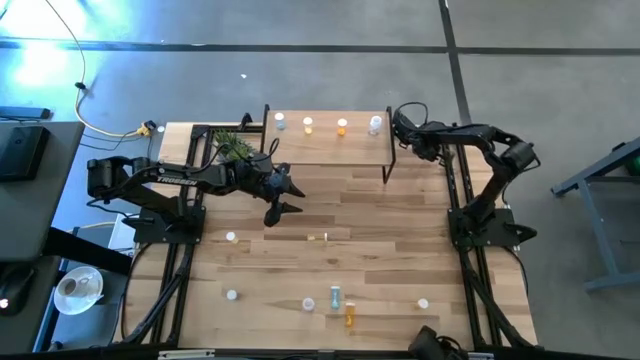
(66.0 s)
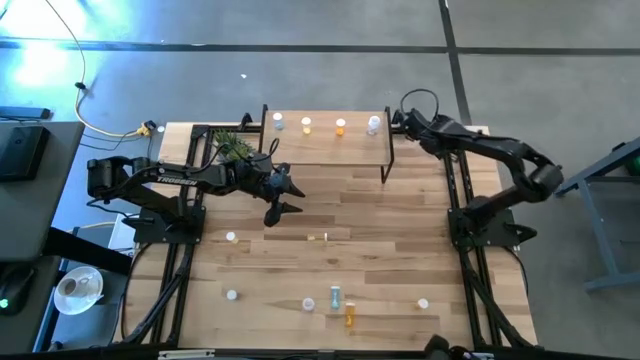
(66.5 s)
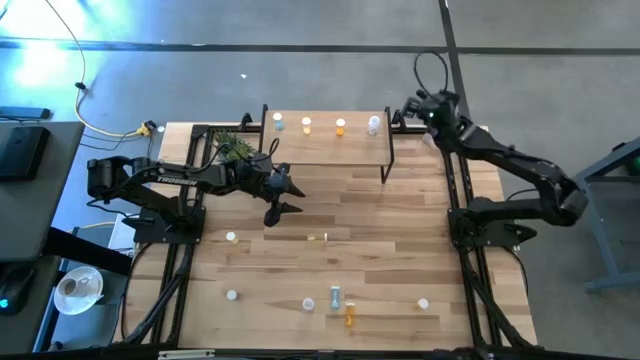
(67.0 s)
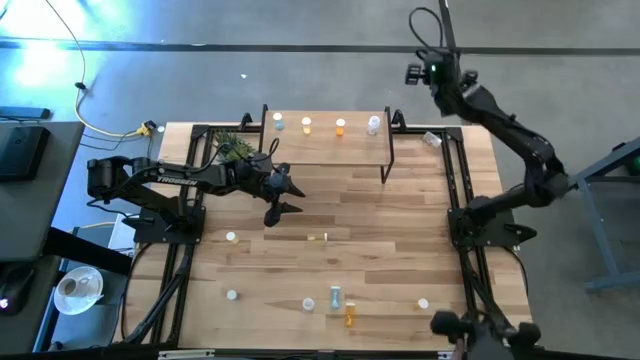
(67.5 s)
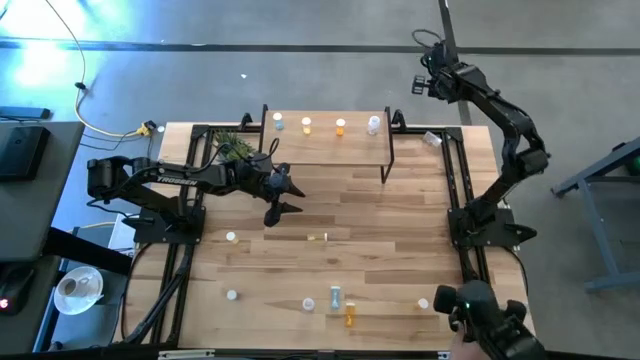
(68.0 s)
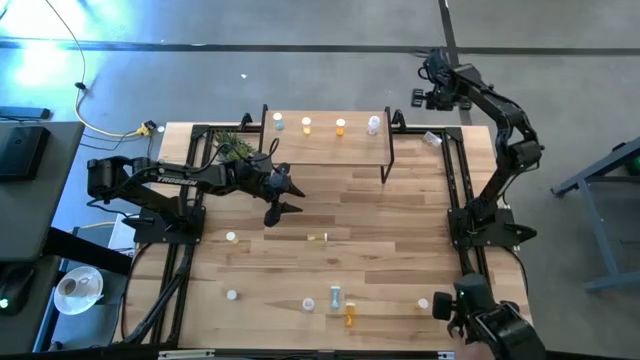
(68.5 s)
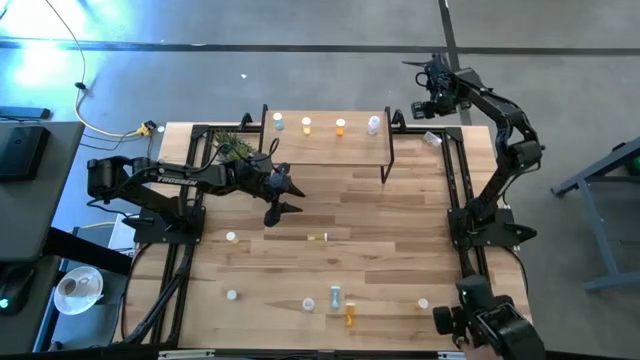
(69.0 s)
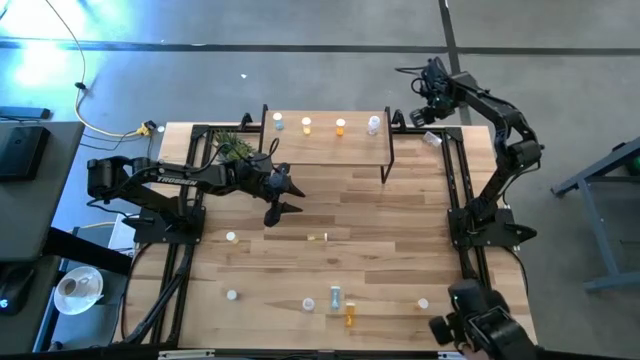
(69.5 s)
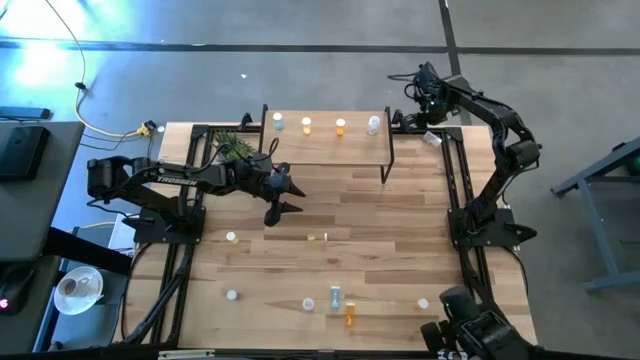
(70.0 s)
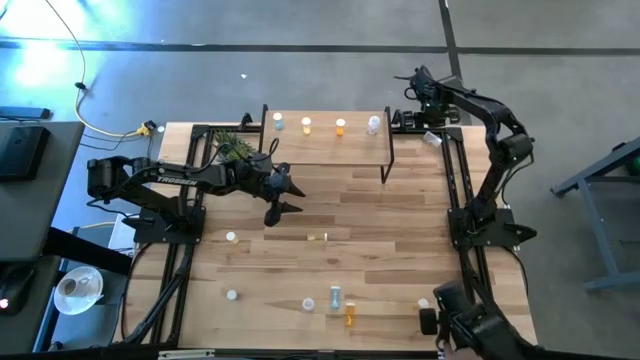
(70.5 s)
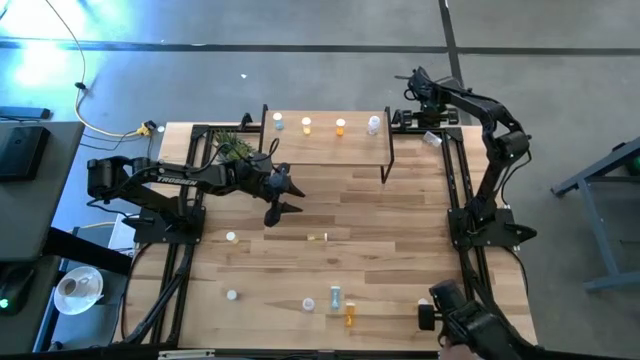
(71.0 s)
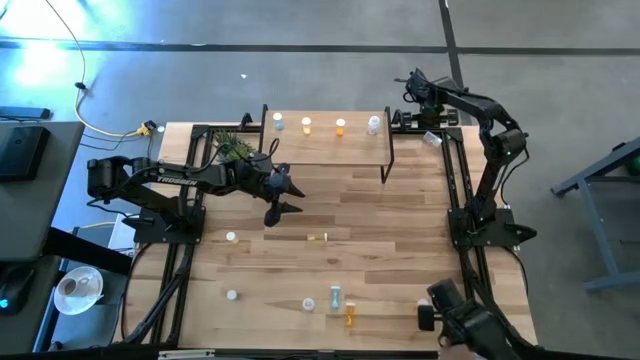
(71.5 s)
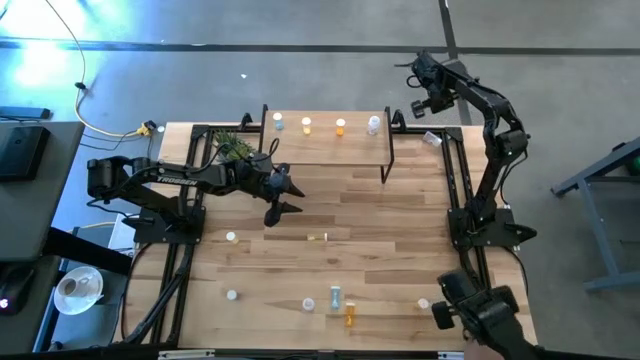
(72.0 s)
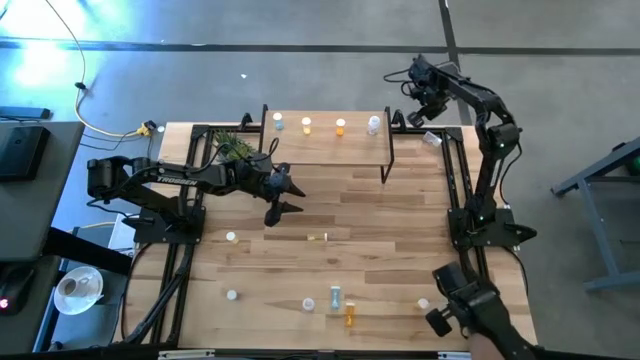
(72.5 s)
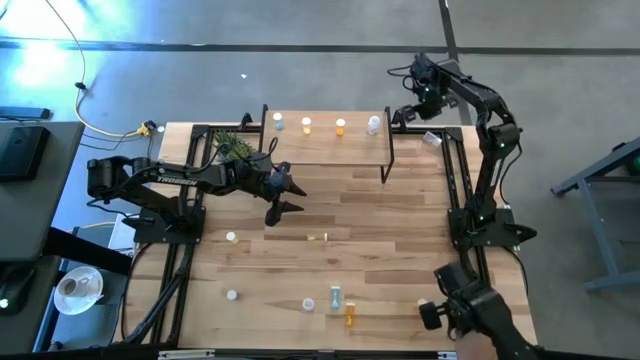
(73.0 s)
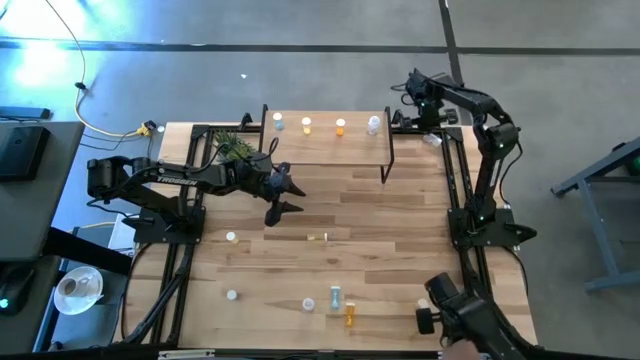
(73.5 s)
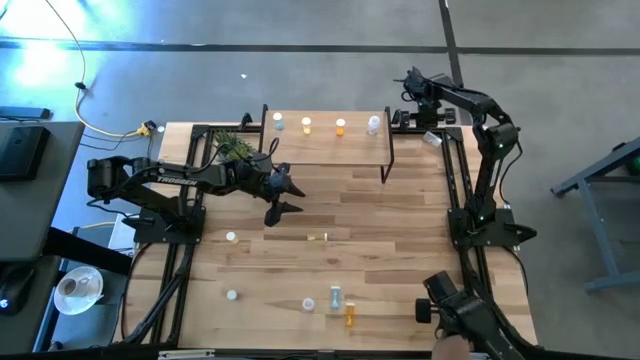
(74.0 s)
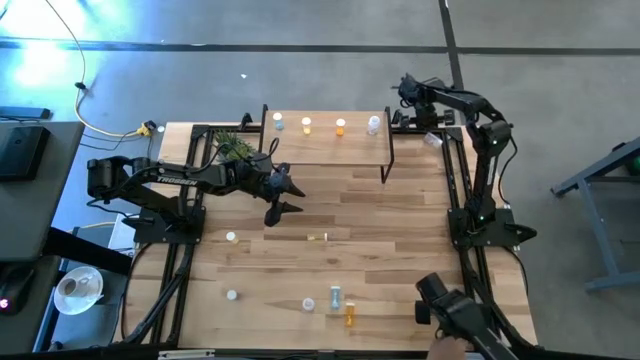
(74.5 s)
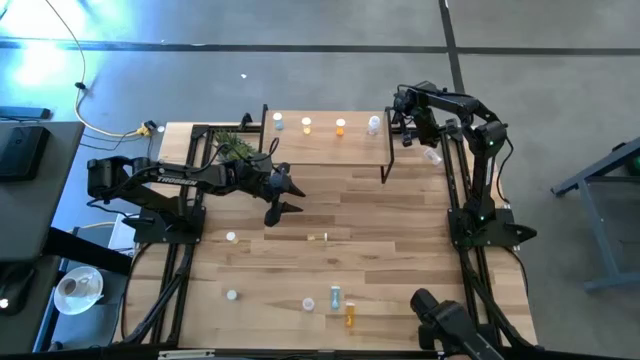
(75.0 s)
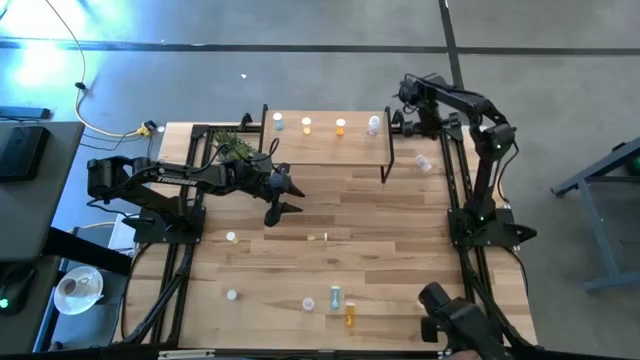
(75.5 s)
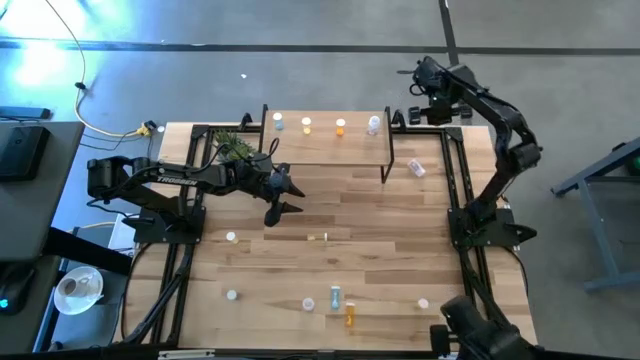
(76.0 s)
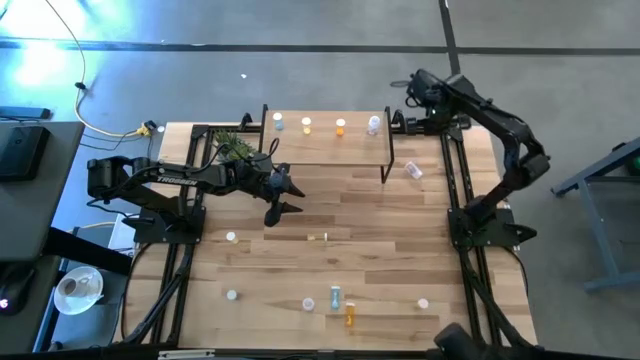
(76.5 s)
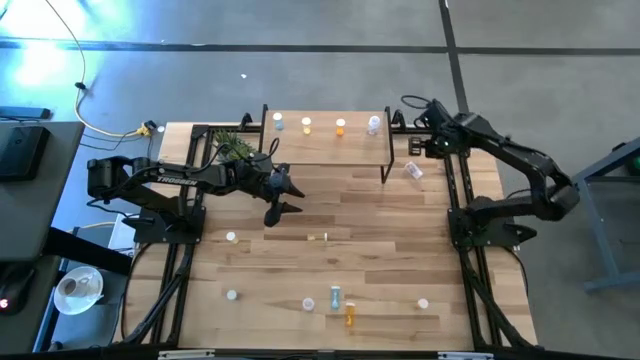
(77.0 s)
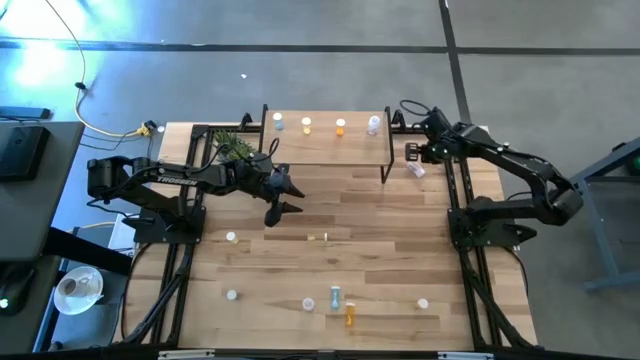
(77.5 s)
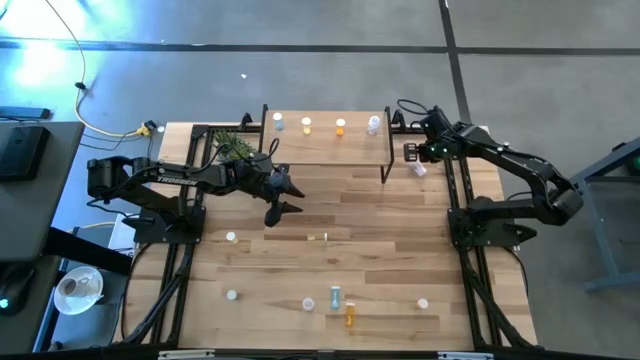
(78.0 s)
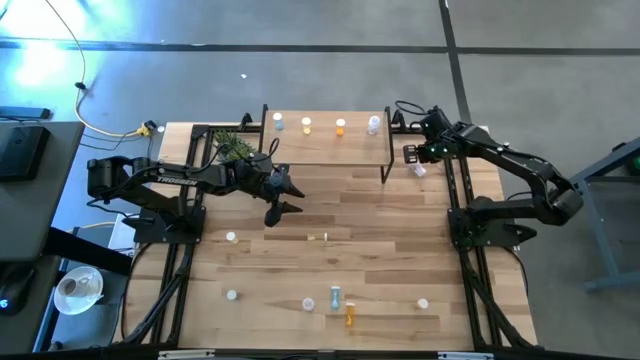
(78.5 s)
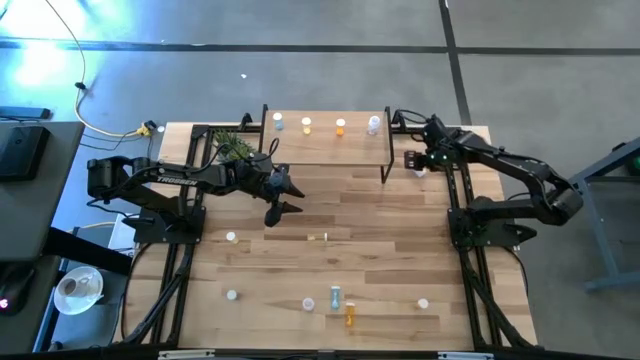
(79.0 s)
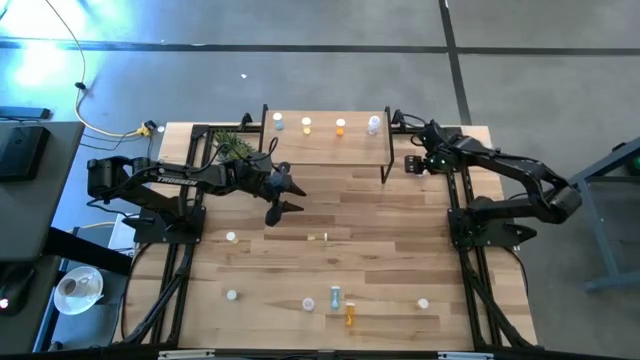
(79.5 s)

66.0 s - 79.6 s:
Task: Pick and place medicine bottles onto shelf by color
Put the top transparent pill bottle on the shelf aligned with the transparent pill bottle

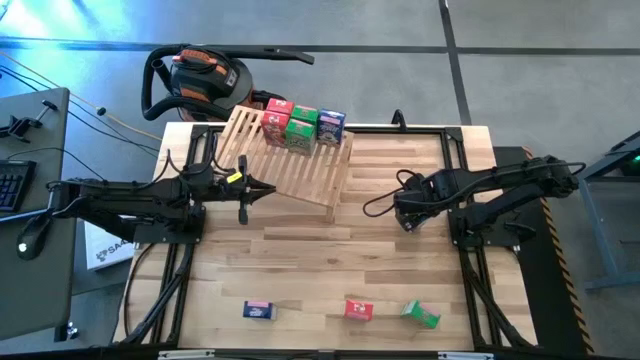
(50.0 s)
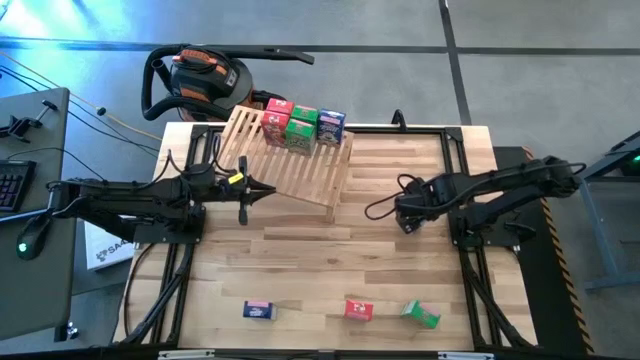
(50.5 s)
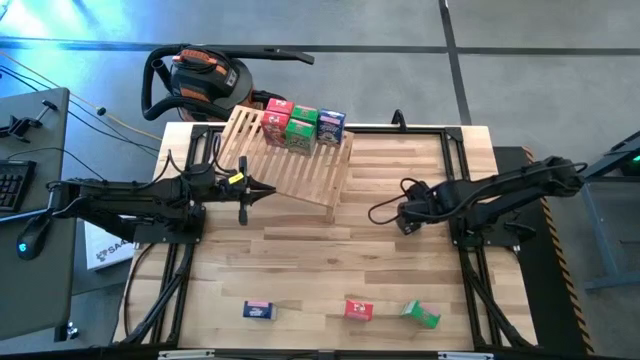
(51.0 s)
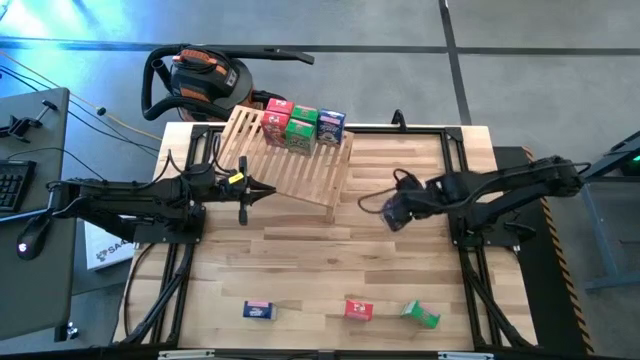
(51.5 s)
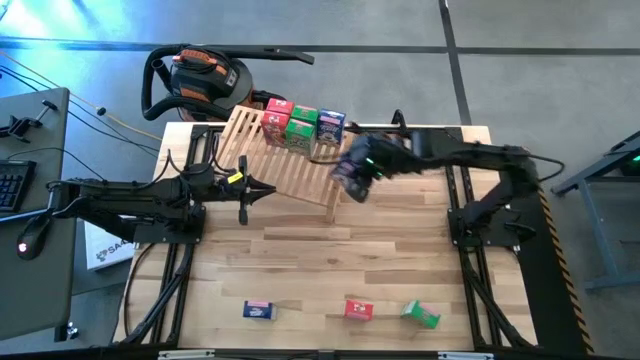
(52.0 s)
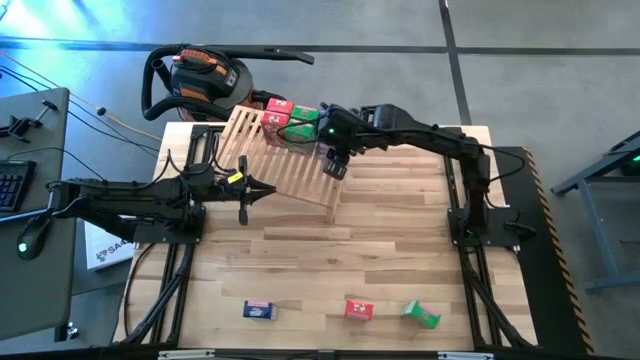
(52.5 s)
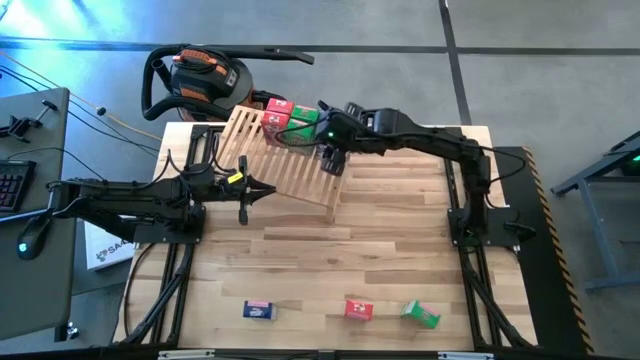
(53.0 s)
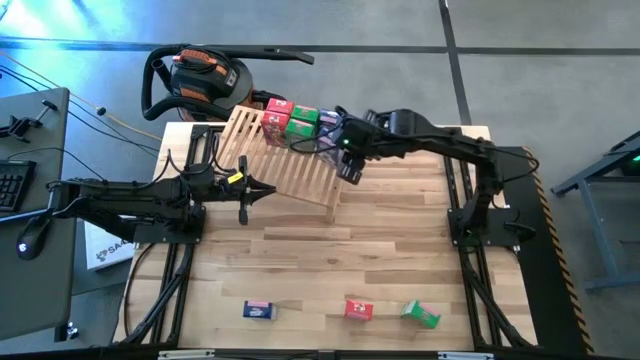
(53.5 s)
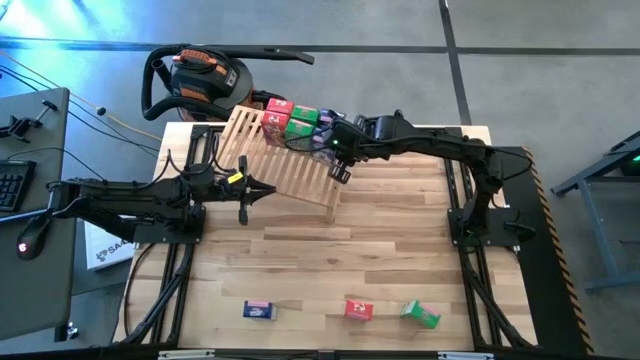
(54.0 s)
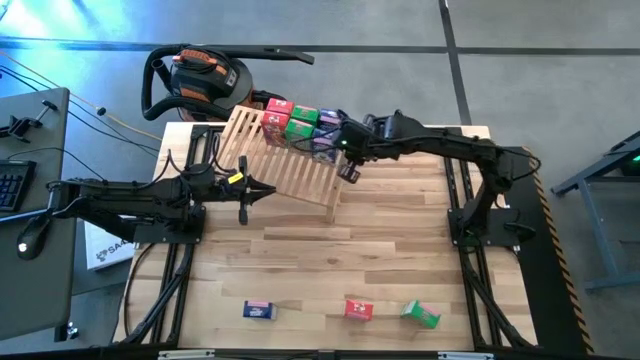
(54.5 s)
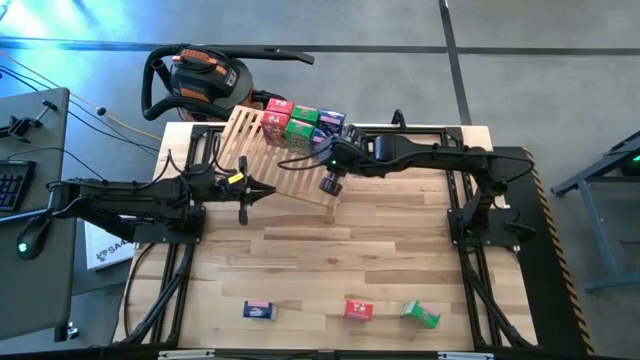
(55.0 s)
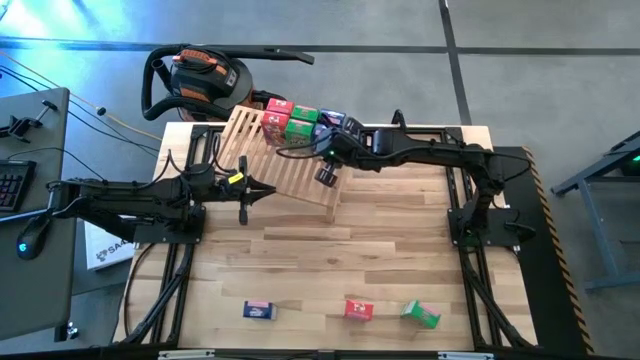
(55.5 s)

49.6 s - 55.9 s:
Task: Stack cereal on shelf
Put the right blue cereal box aligned with the other blue cereal box on the shelf

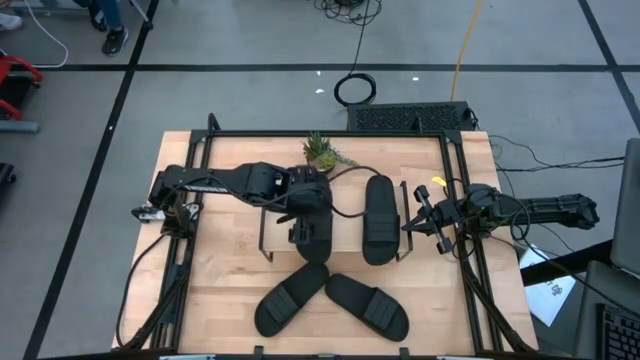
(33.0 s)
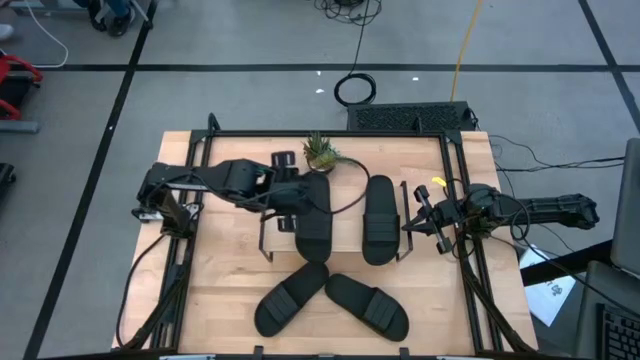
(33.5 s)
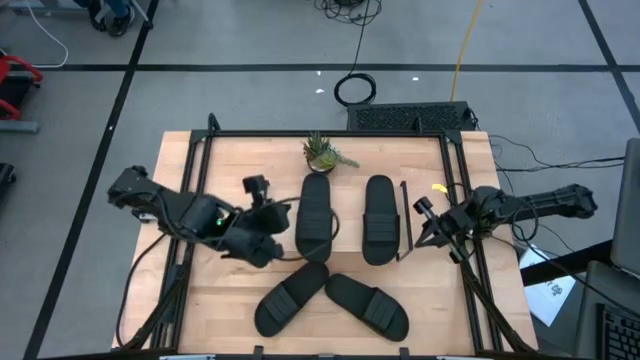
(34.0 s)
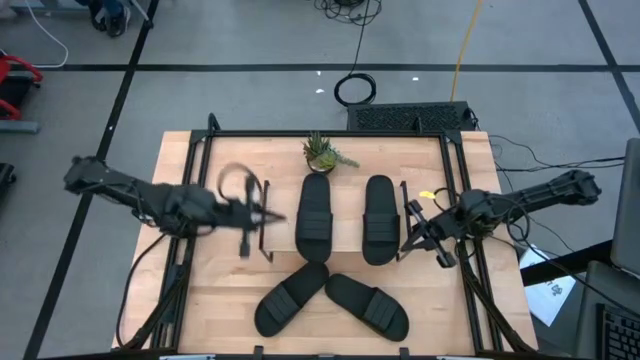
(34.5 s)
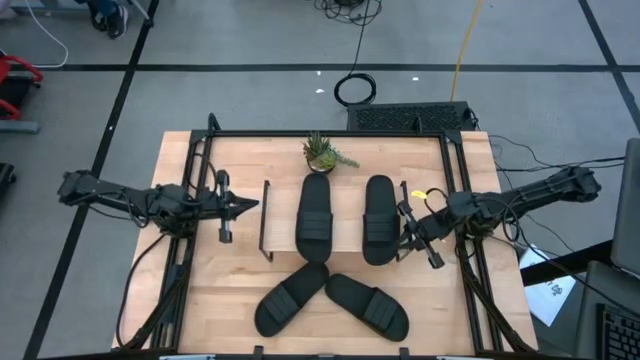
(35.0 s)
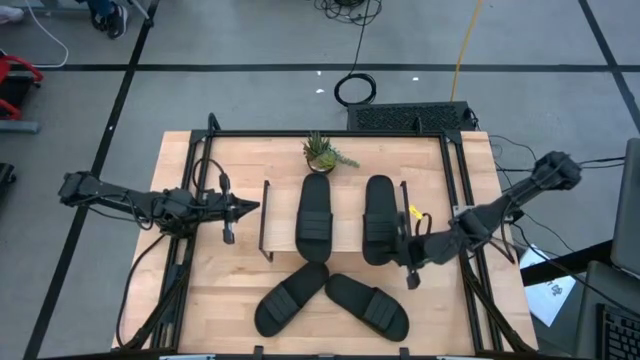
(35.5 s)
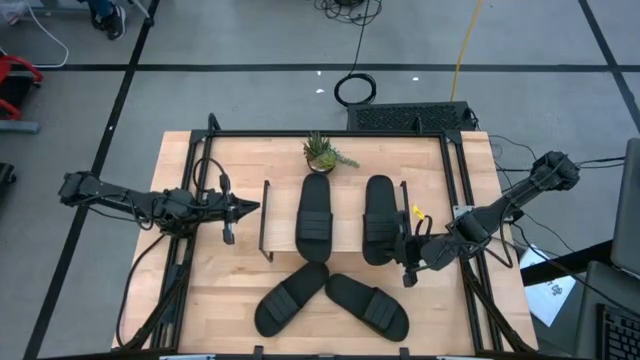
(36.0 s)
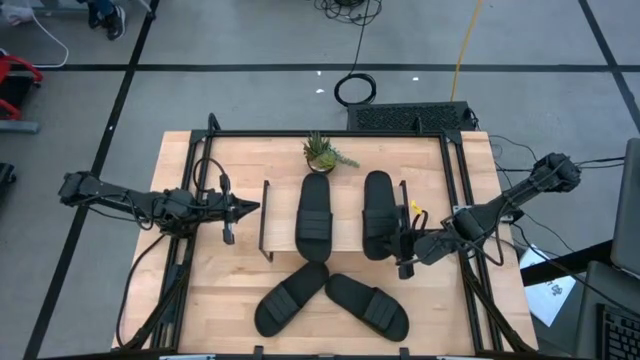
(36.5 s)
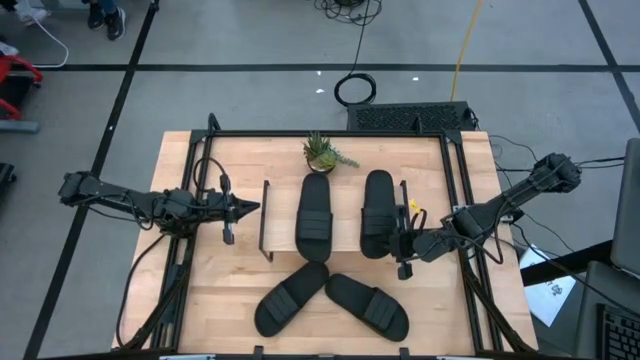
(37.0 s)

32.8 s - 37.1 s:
Task: Pick and place slides into the shelf
Adjust the black sandal on the shelf
